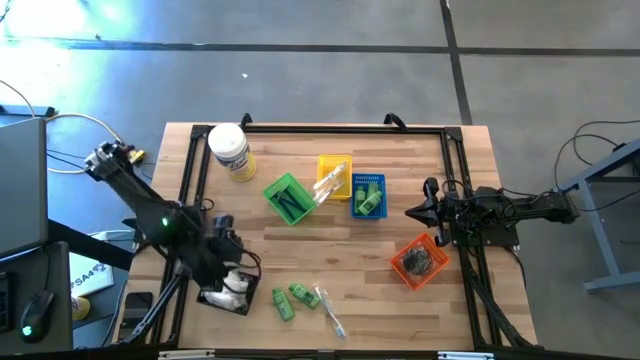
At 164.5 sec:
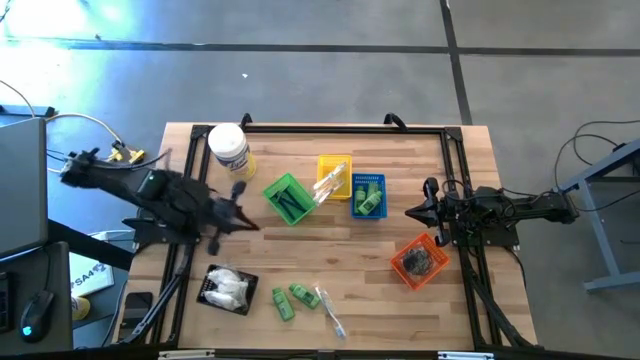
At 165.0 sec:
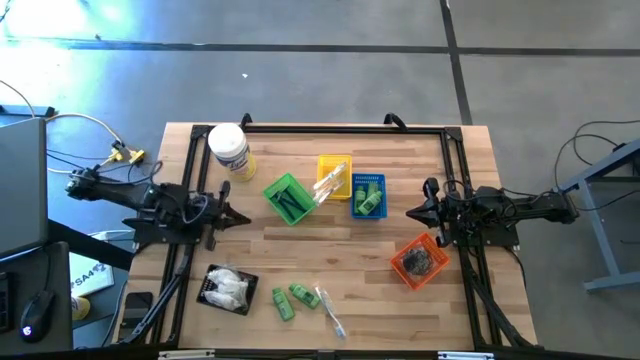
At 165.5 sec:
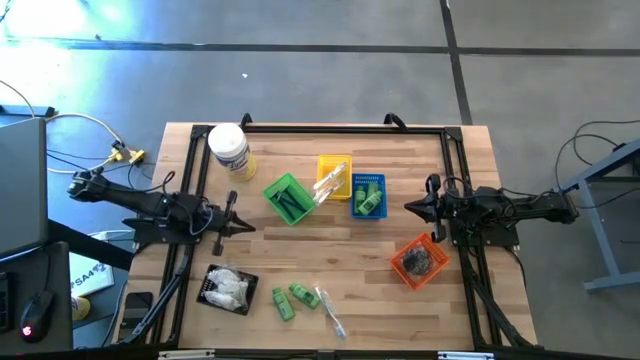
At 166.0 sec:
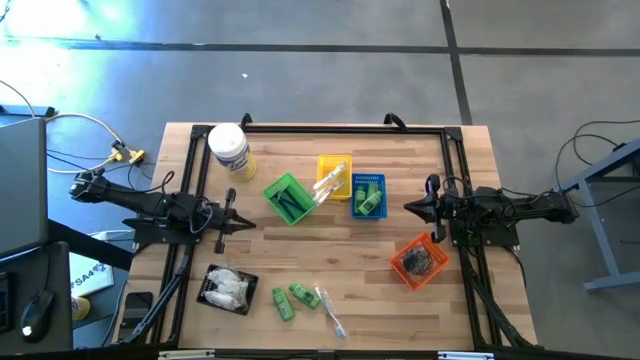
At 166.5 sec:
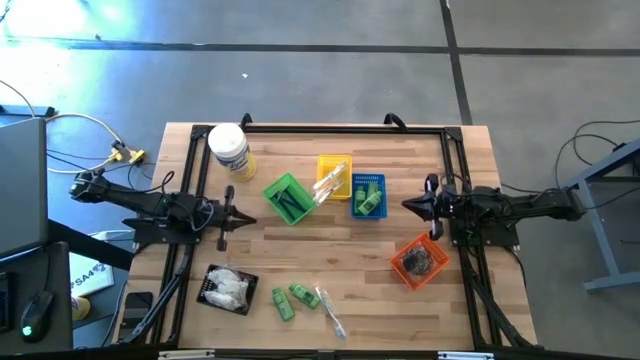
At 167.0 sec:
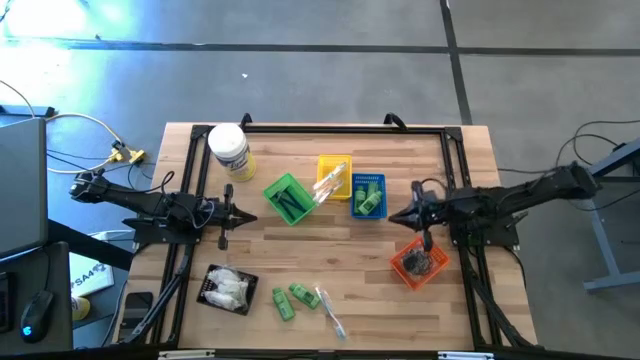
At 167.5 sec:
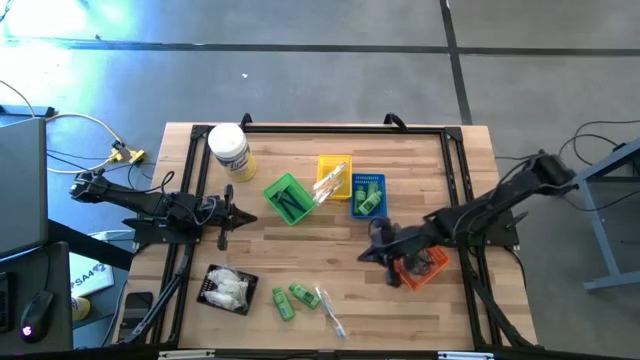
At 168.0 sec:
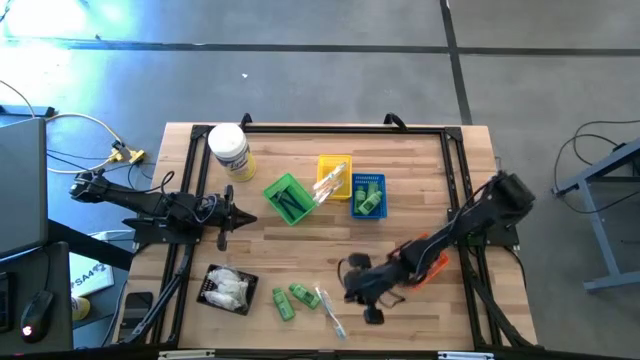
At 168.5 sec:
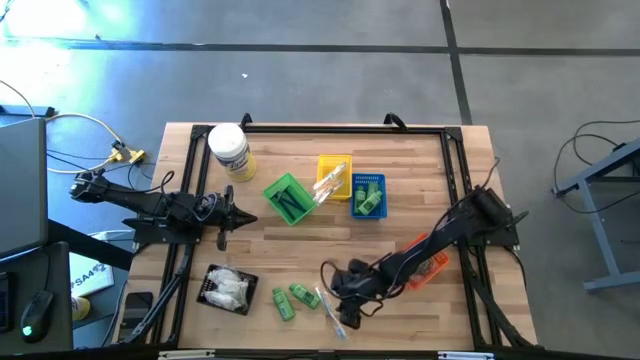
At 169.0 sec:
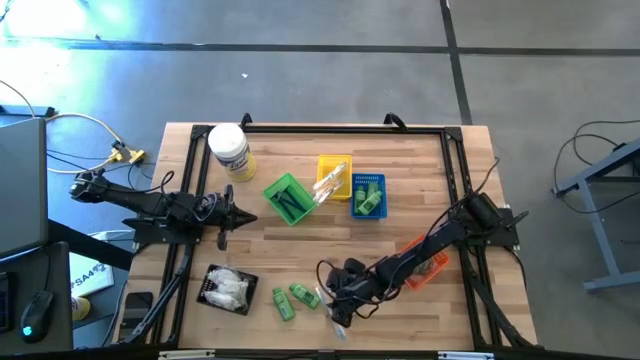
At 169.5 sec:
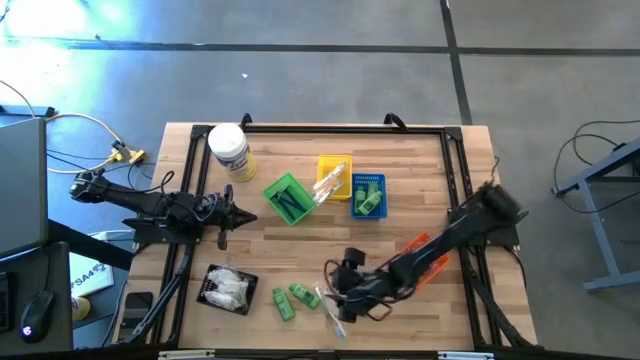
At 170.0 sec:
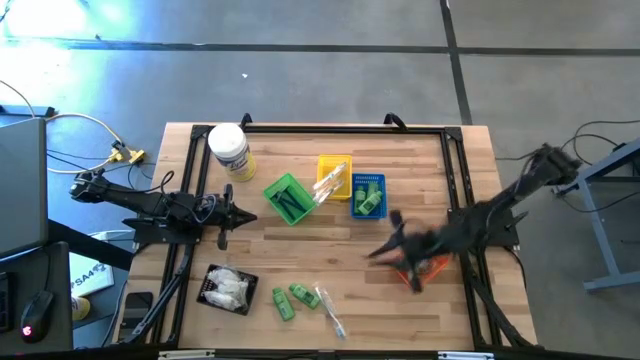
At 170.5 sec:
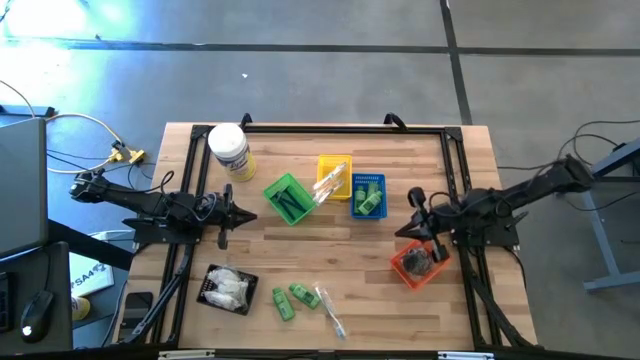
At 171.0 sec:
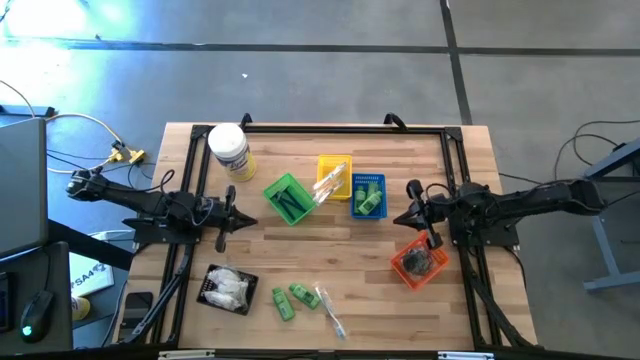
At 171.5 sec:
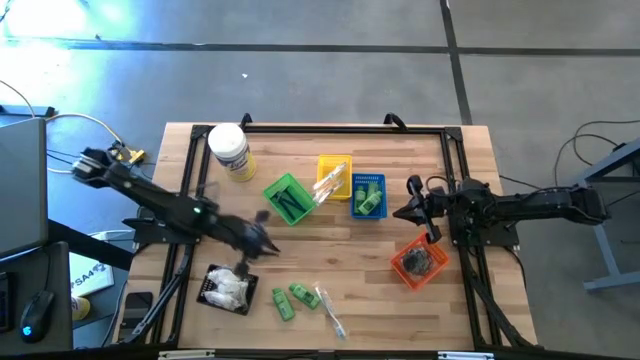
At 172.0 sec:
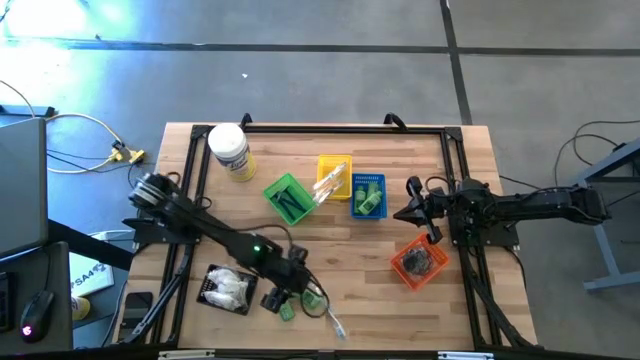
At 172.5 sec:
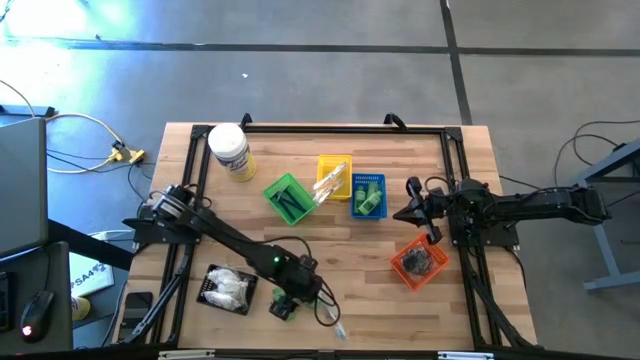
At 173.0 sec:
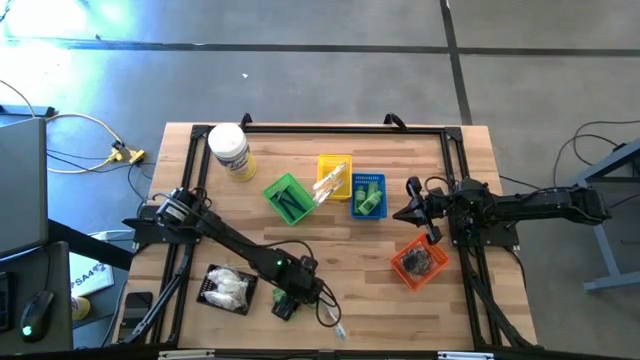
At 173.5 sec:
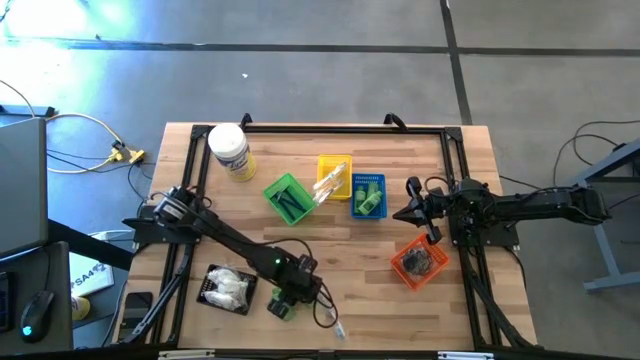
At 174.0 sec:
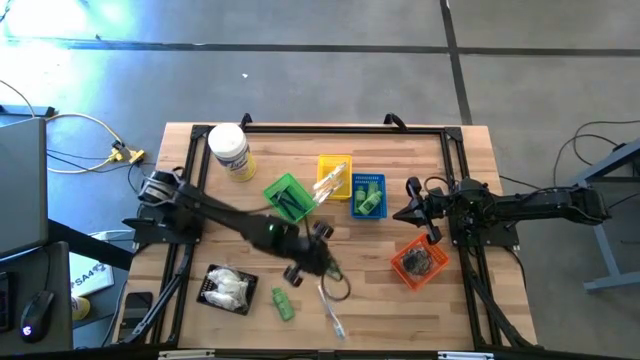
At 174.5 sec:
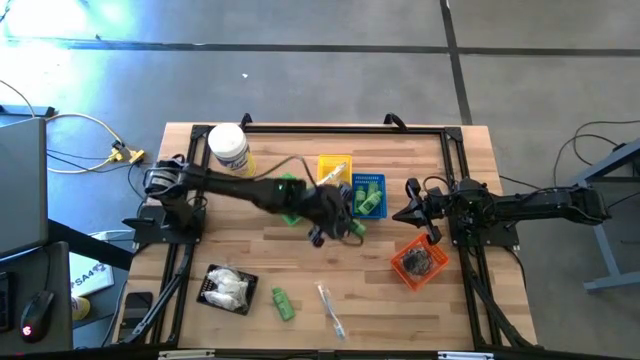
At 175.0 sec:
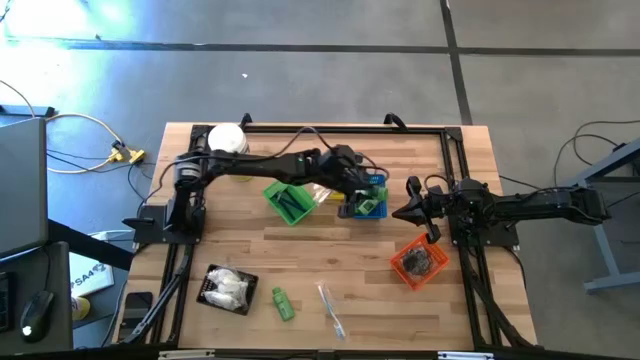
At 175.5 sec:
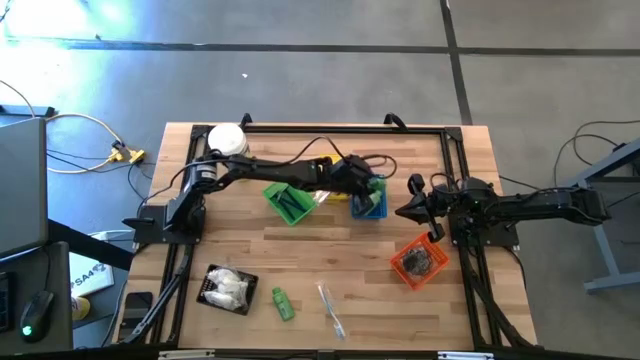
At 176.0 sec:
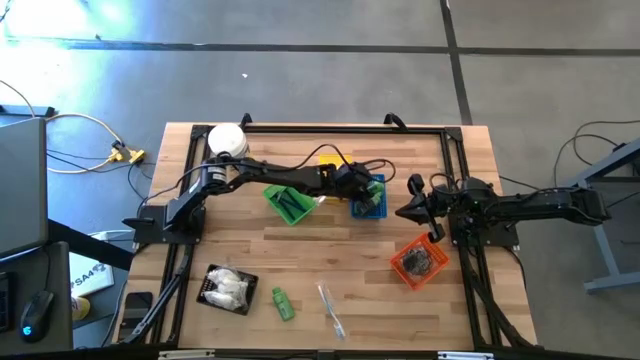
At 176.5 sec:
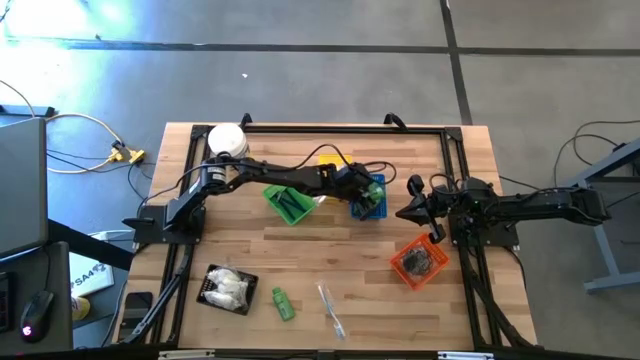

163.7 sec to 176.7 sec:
Task: Pick & Place Travel size toiletries
Put the green shampoo into the blue basket

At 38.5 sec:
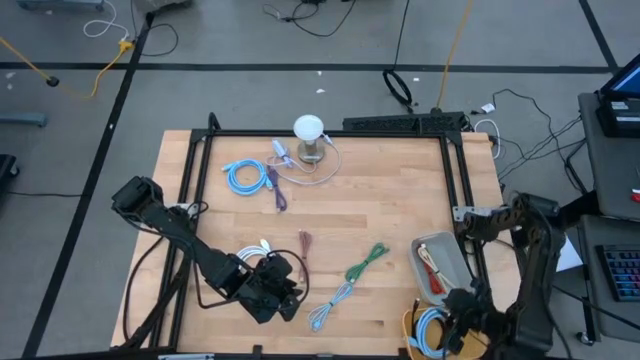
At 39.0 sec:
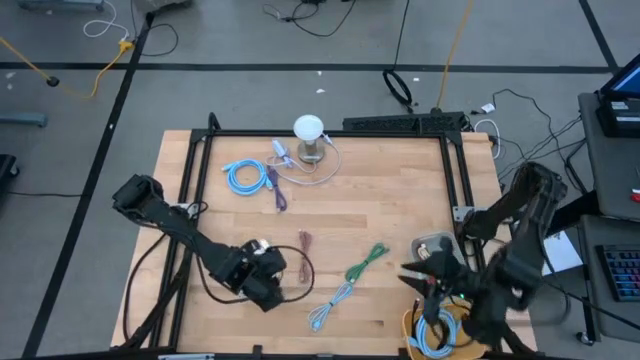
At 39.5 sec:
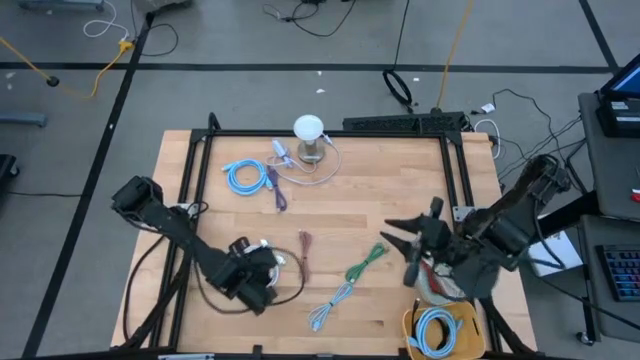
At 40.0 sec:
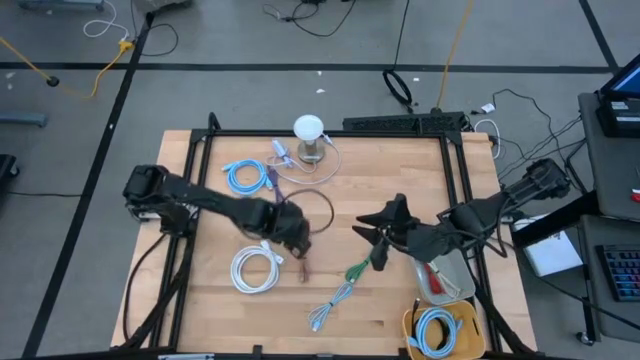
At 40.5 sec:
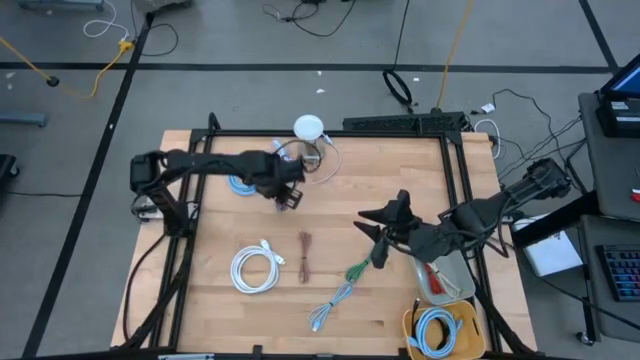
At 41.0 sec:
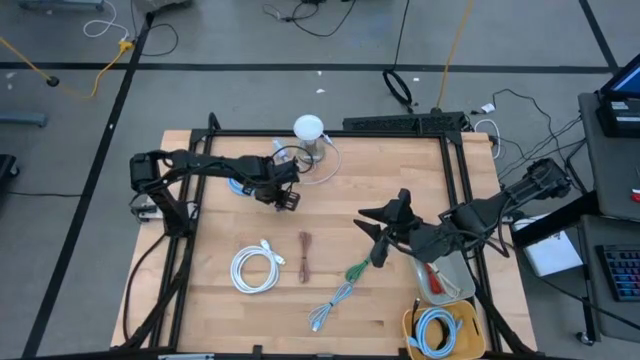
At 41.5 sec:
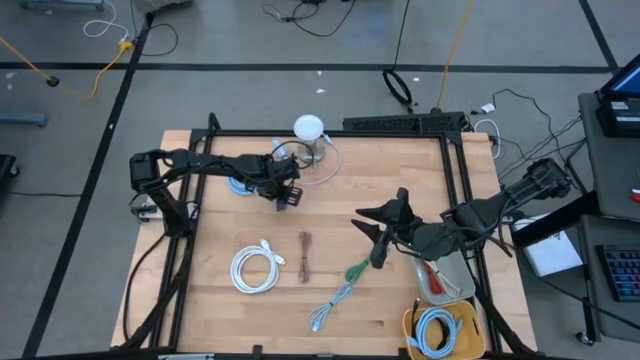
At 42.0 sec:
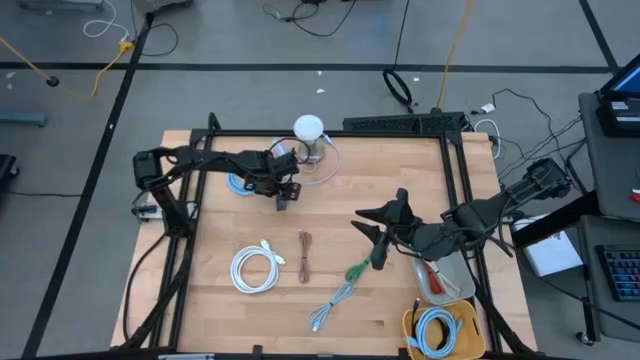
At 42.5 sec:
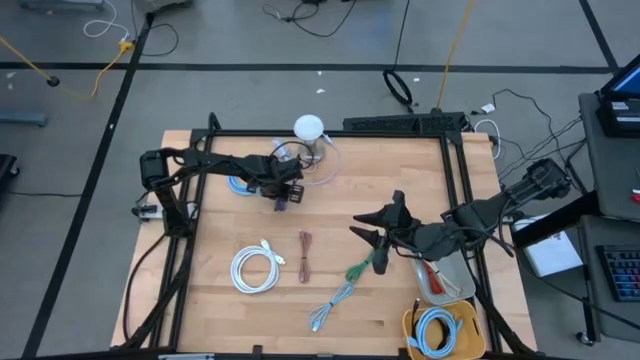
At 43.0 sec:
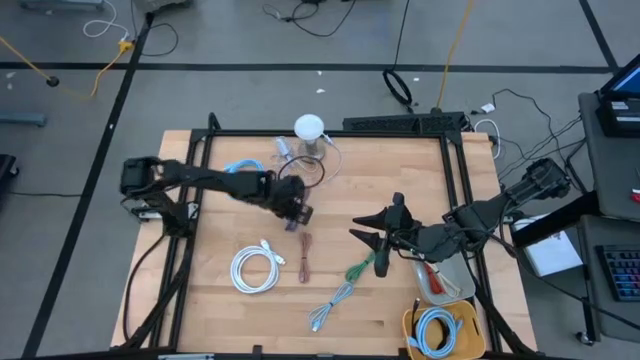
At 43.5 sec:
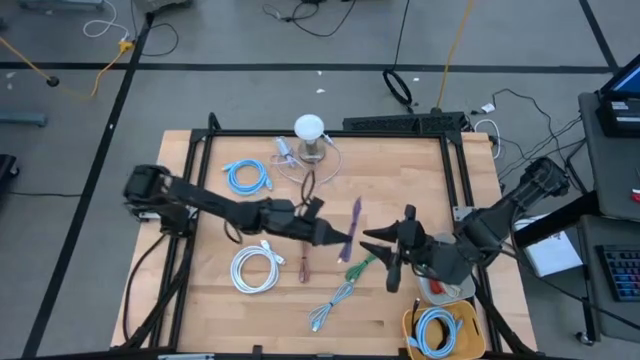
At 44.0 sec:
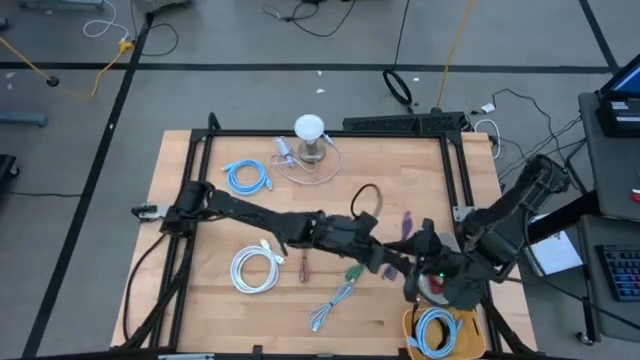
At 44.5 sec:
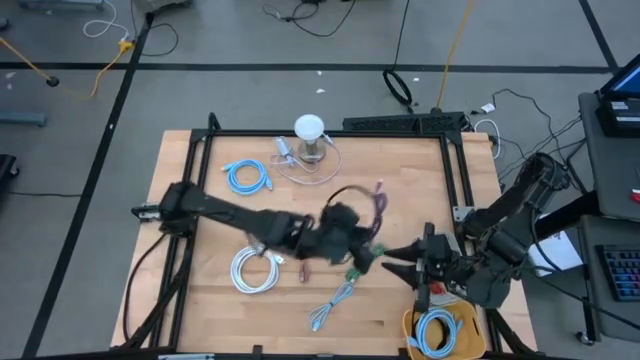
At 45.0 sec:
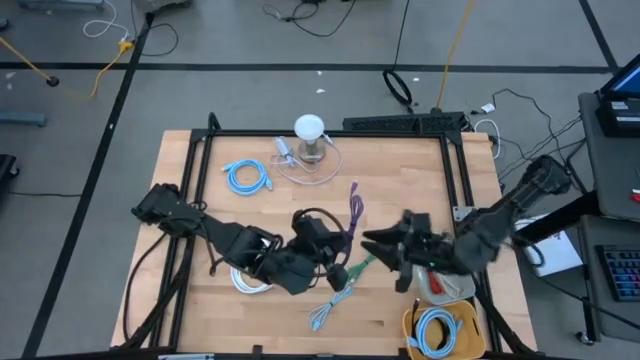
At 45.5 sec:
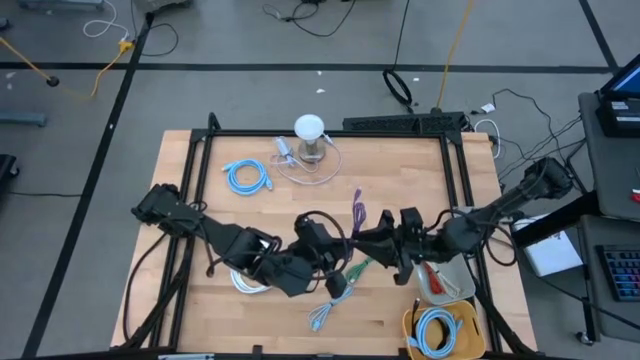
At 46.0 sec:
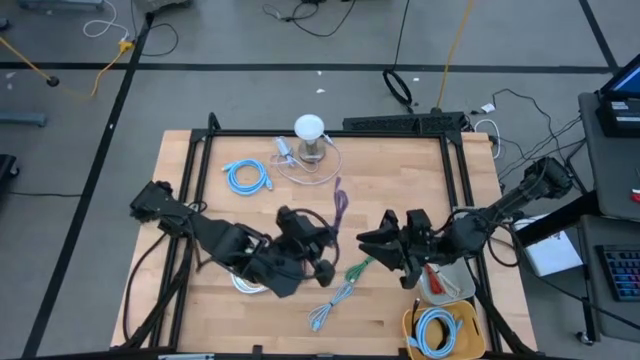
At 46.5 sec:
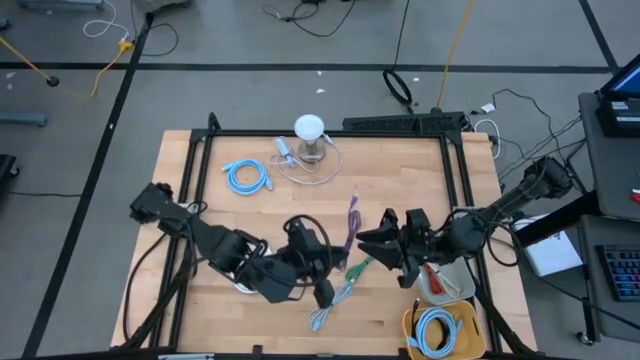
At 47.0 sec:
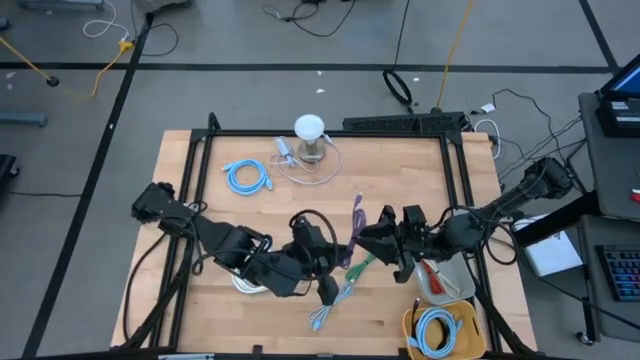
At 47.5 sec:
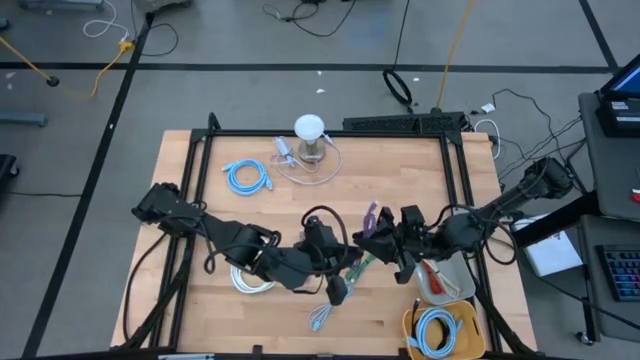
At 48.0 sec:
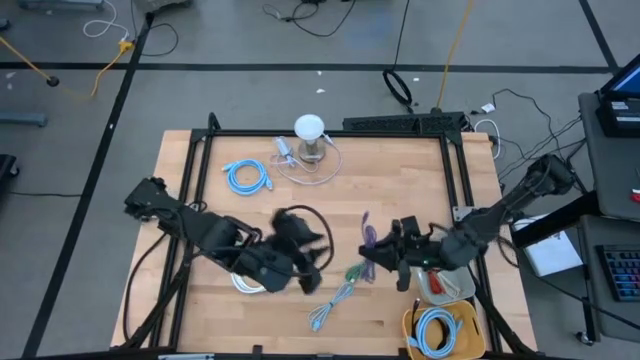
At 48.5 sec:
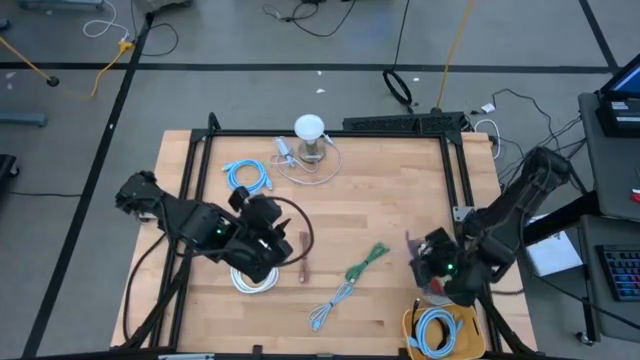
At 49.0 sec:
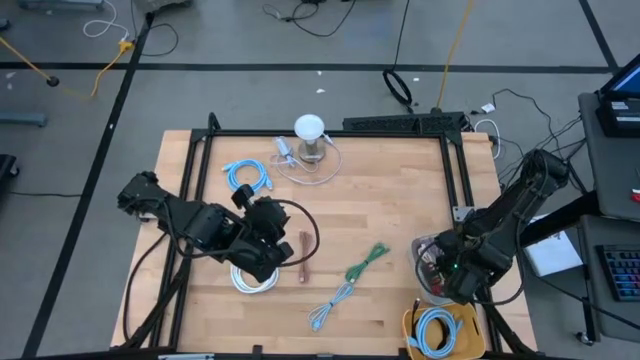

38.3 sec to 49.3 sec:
Task: Pick & Place USB Port
Put the violet USB cable into the gray bin
